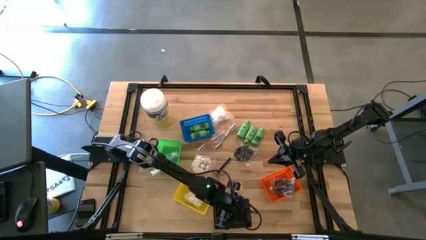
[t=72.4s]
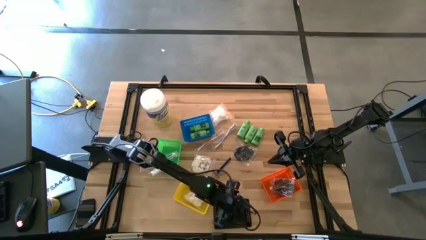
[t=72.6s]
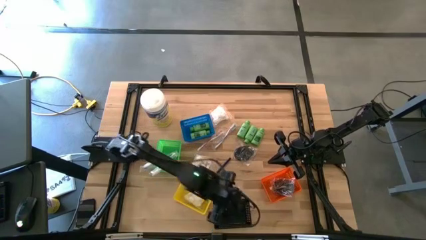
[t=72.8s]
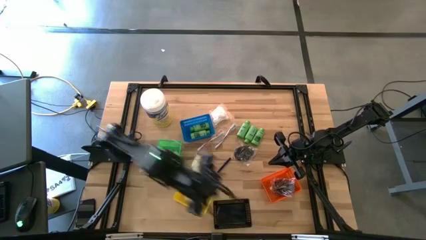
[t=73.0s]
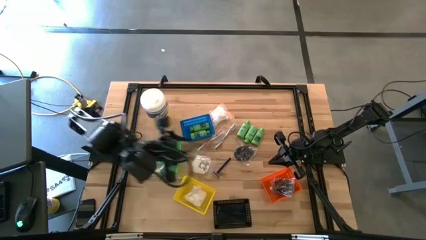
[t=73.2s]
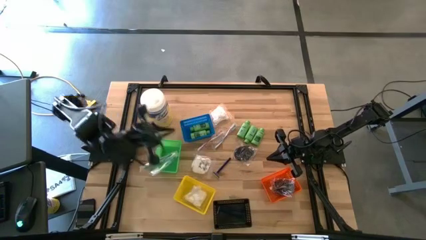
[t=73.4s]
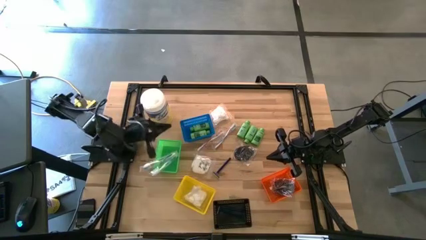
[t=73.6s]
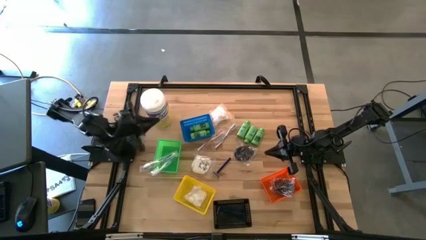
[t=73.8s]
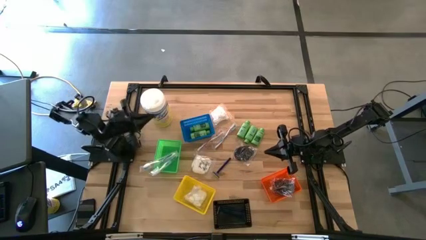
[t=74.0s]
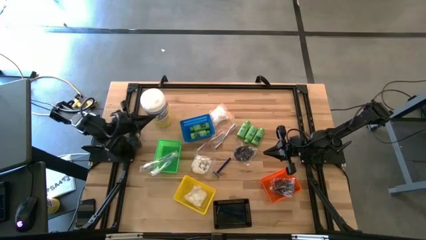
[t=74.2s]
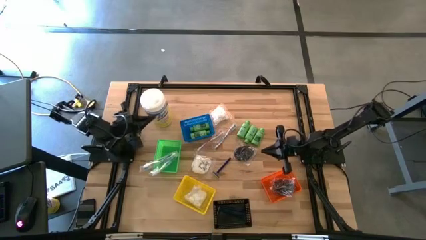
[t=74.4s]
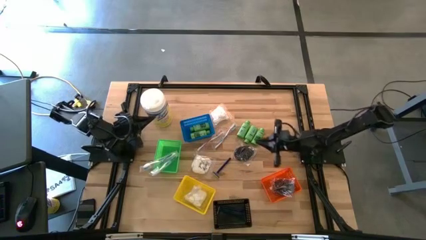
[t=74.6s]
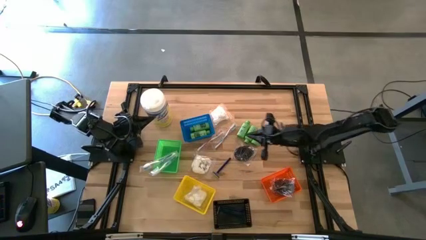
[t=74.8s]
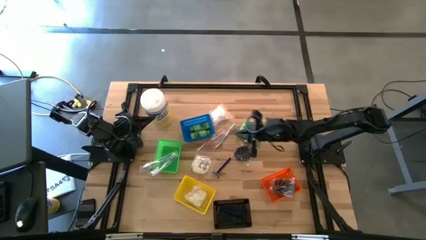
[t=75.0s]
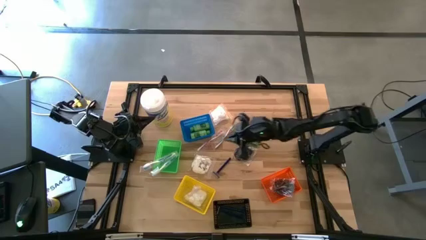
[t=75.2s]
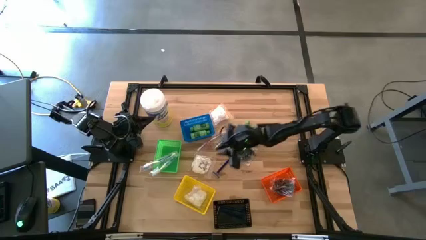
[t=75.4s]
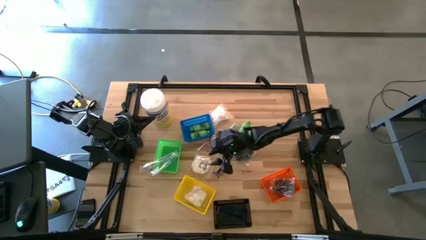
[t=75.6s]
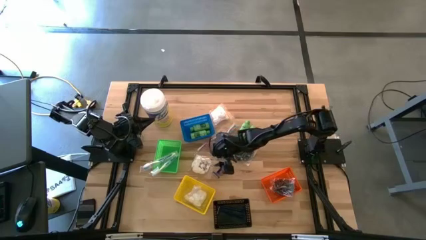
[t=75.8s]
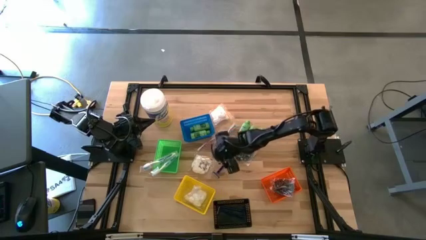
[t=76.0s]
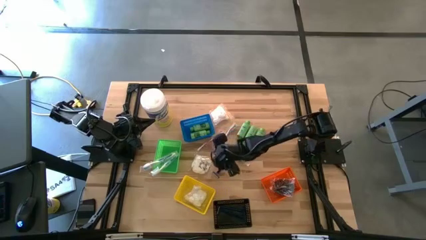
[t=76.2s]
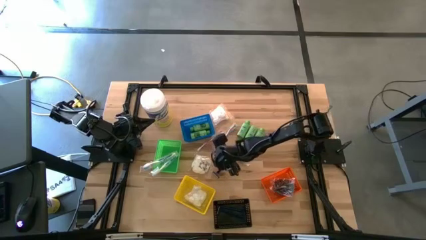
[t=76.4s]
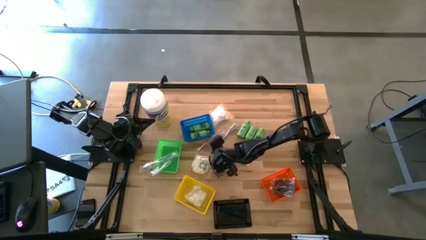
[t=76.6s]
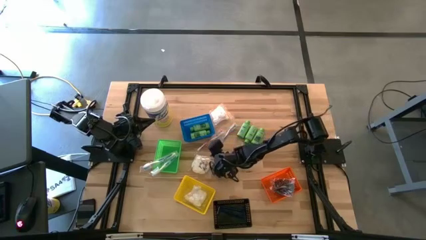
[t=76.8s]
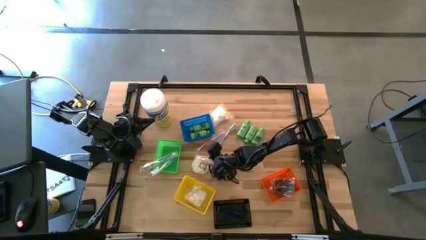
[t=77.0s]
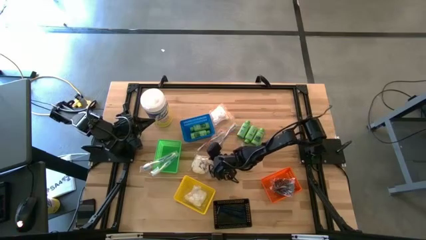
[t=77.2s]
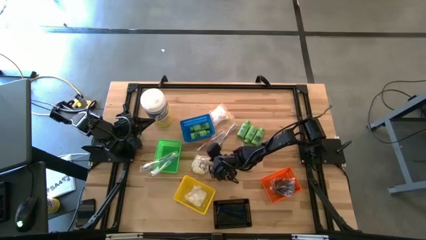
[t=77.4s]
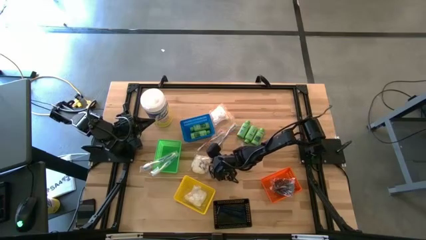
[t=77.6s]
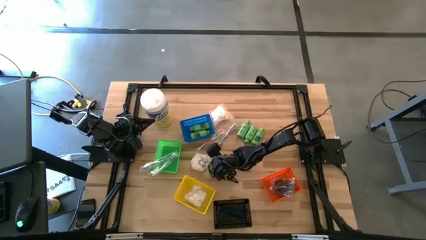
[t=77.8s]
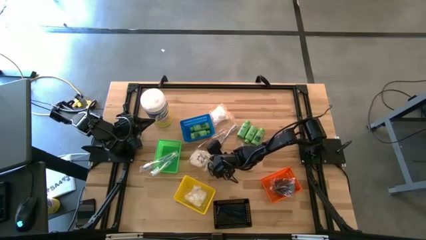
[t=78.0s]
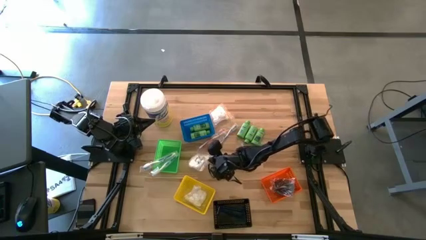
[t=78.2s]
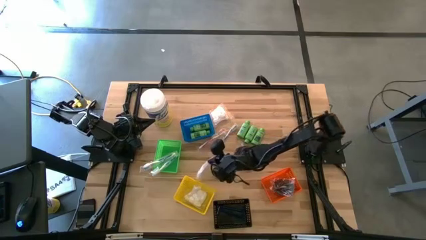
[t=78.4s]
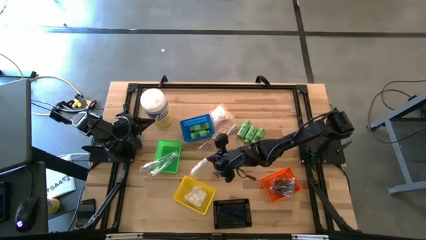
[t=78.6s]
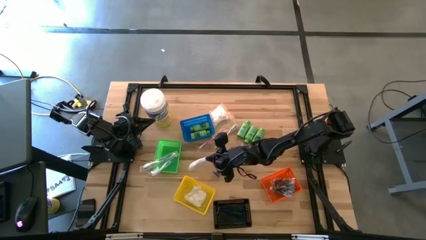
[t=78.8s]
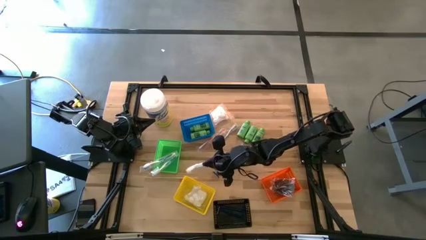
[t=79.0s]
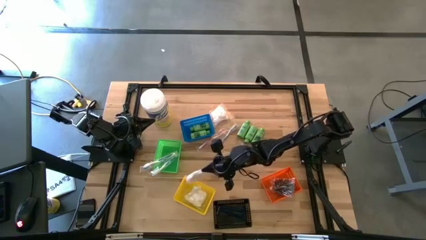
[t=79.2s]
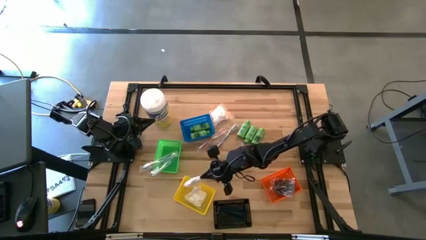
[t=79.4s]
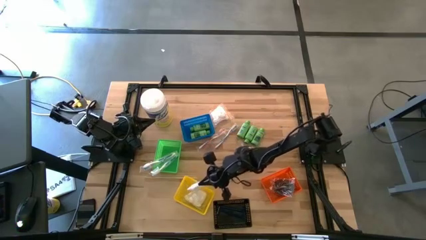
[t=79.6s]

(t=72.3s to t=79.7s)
Task: Pick & Place Travel size toiletries
Put the white cotton pack into the yellow bin

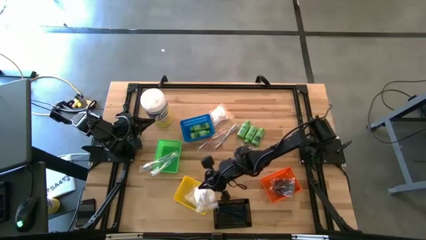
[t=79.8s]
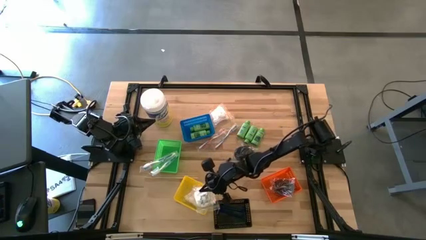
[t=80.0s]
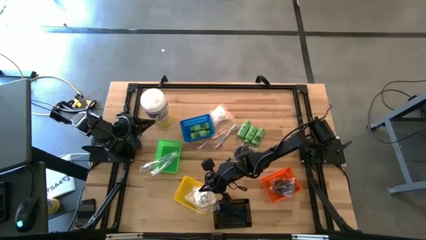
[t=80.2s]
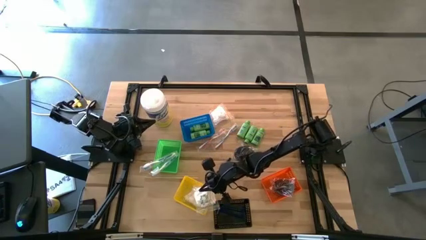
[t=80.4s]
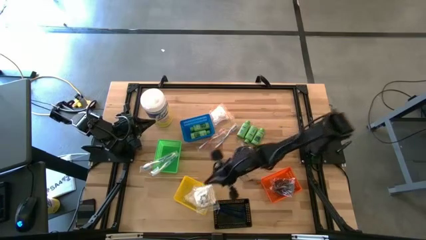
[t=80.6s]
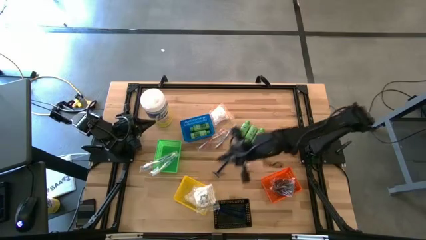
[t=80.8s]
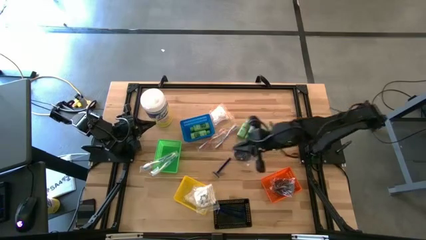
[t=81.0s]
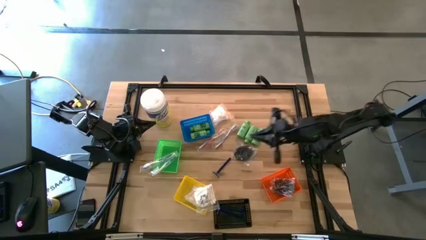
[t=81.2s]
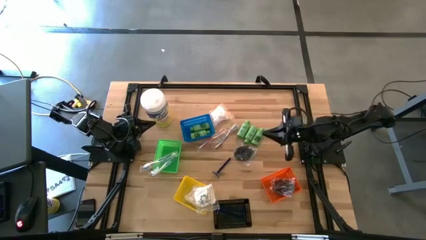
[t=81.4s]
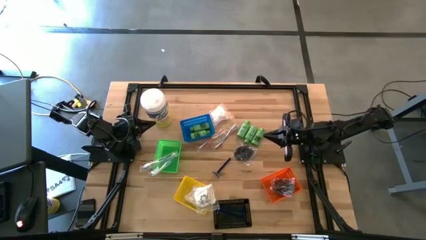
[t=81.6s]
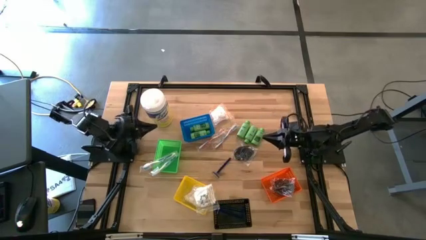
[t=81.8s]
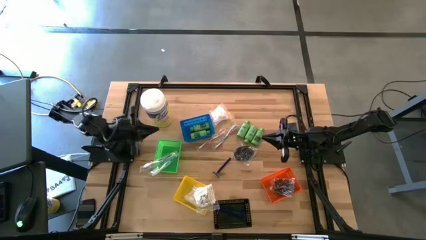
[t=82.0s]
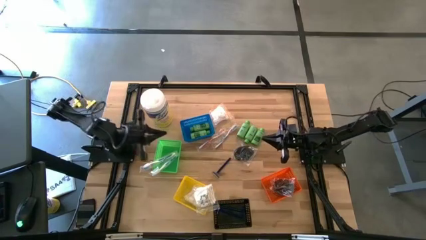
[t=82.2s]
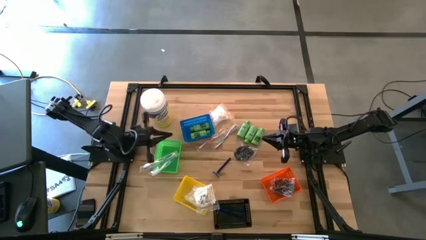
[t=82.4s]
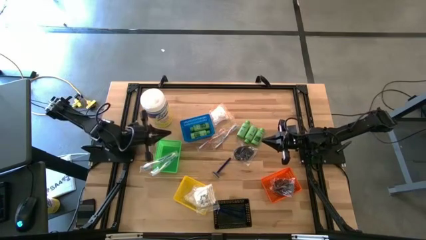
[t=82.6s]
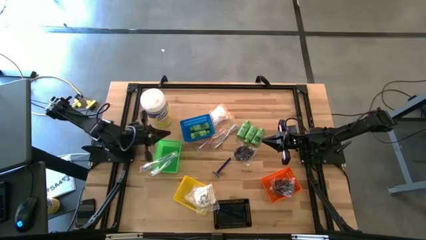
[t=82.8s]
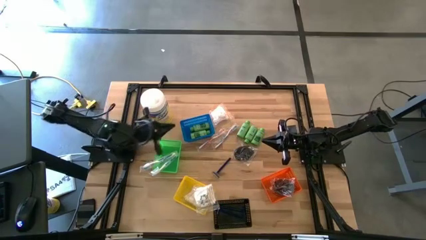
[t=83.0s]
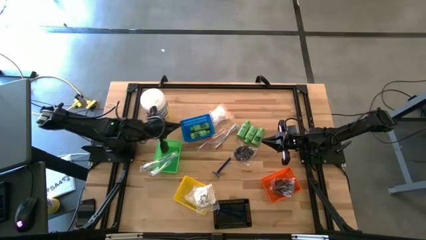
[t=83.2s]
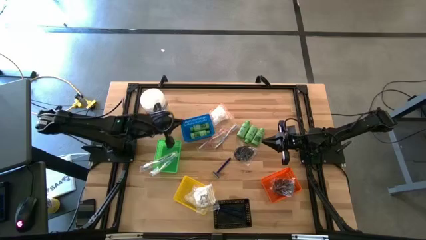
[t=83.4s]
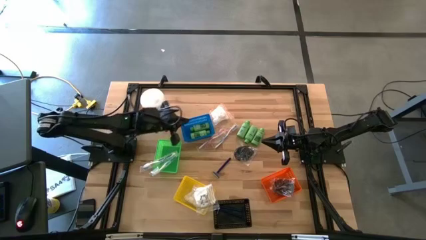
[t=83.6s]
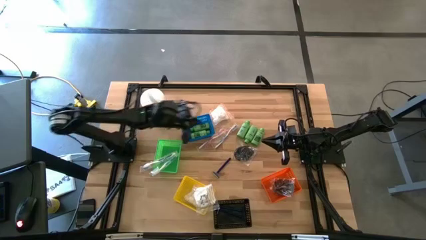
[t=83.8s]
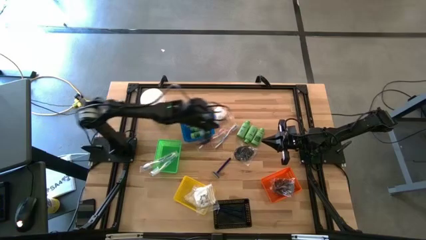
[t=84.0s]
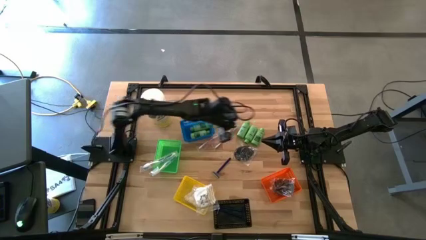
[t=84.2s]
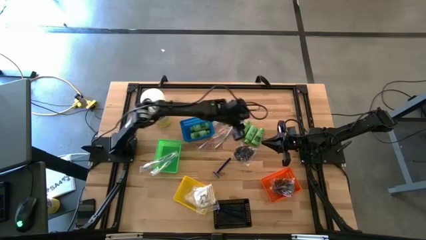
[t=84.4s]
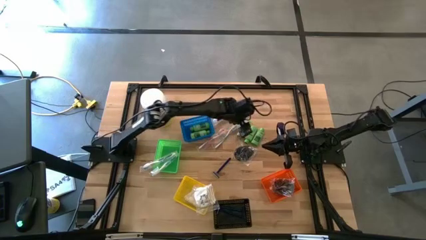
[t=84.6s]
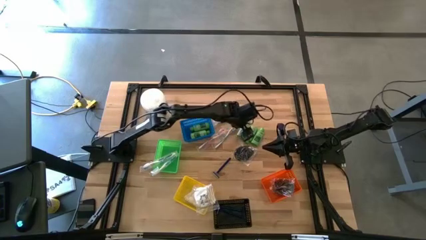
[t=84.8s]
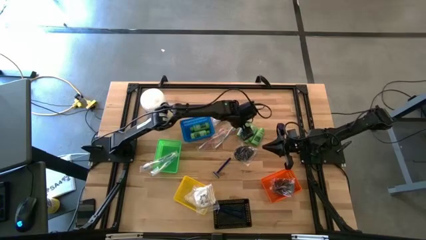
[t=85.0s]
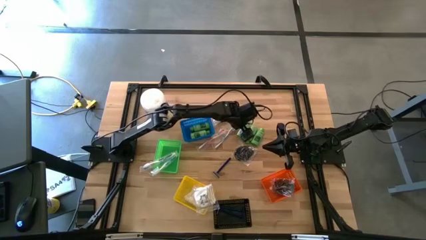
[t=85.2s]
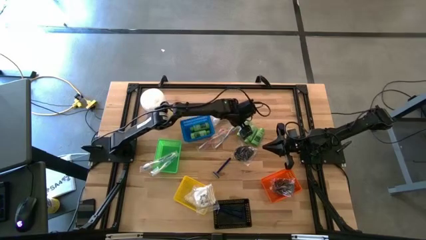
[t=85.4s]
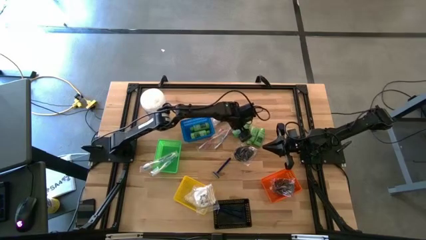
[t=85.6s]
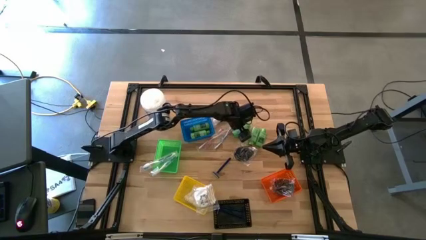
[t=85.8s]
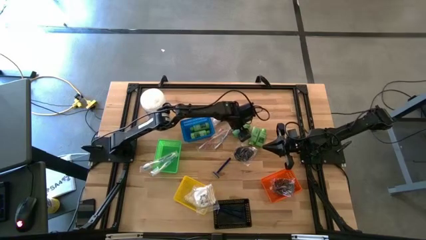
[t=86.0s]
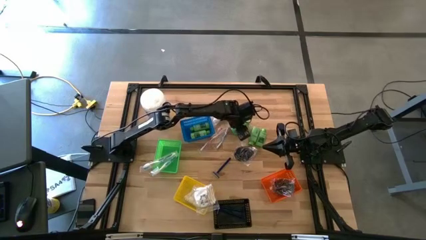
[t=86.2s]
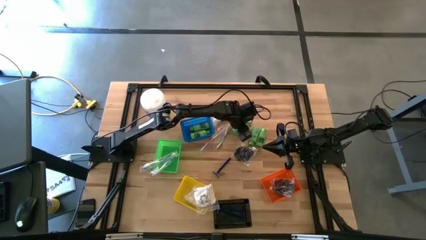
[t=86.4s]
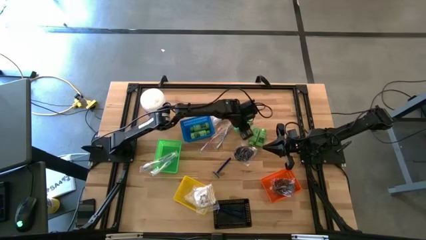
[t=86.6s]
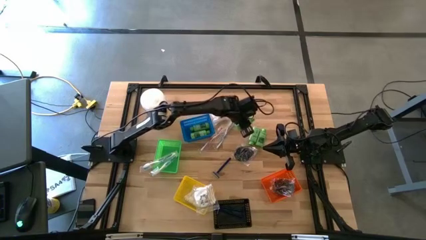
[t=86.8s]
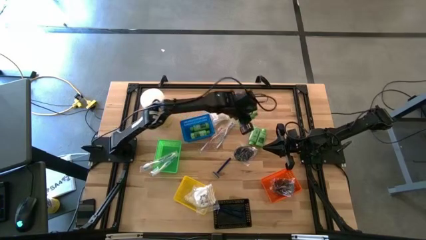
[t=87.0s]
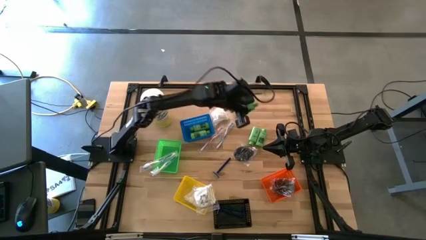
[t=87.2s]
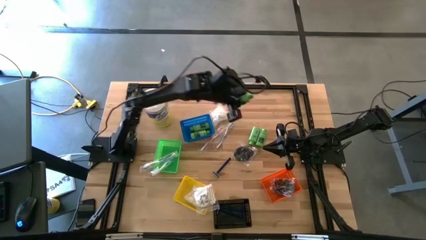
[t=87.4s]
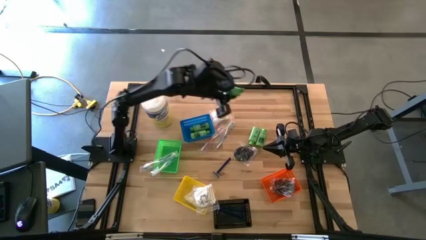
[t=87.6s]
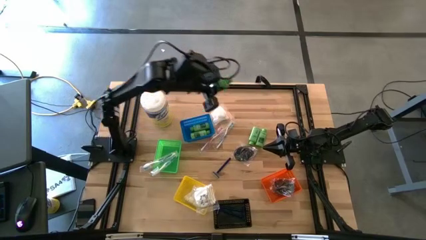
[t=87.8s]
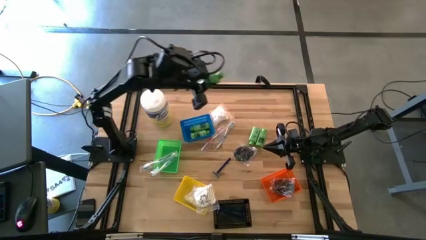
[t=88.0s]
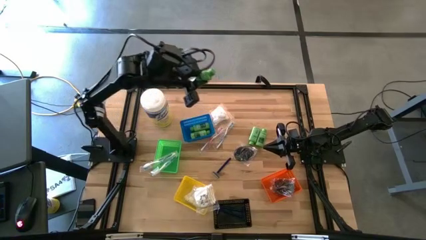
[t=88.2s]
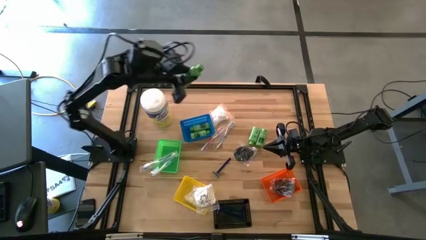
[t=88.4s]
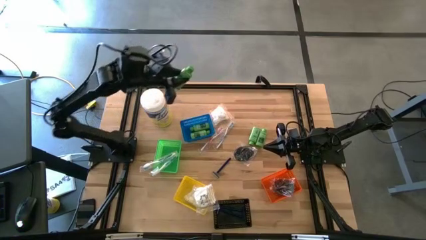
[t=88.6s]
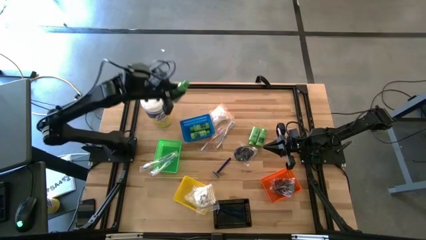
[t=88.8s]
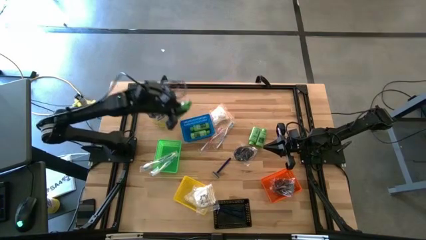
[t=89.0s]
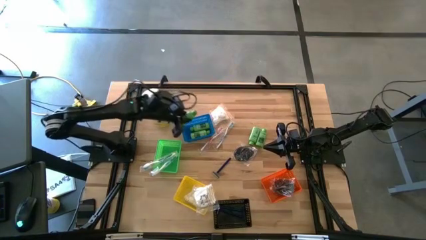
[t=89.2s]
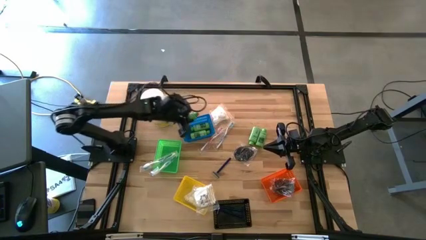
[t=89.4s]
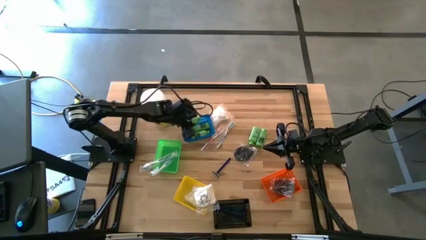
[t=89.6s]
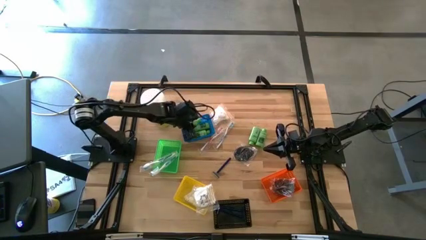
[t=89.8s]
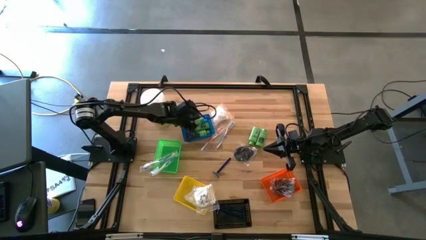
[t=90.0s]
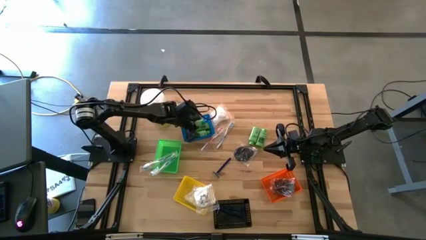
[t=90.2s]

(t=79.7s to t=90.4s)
Put the green shampoo into the blue bin
